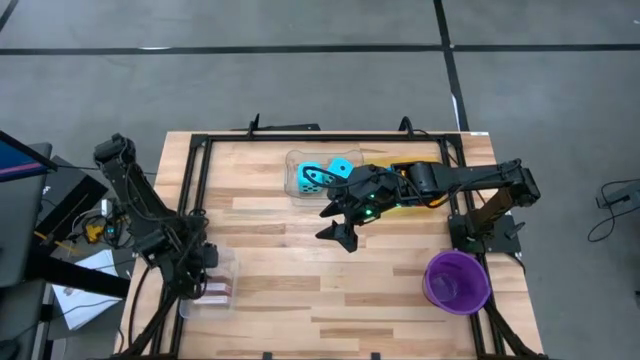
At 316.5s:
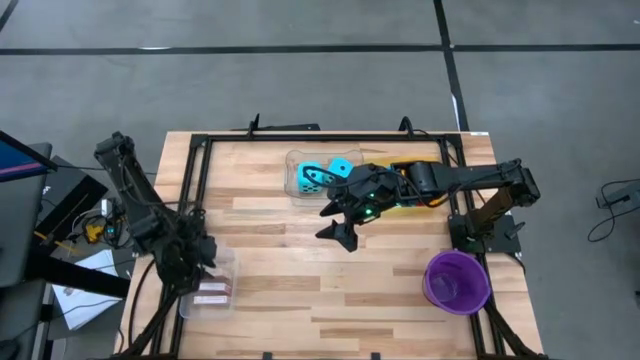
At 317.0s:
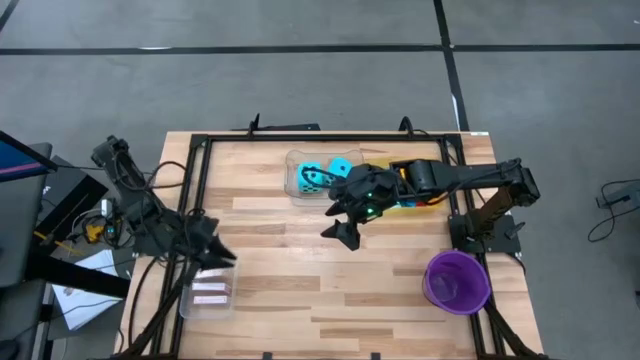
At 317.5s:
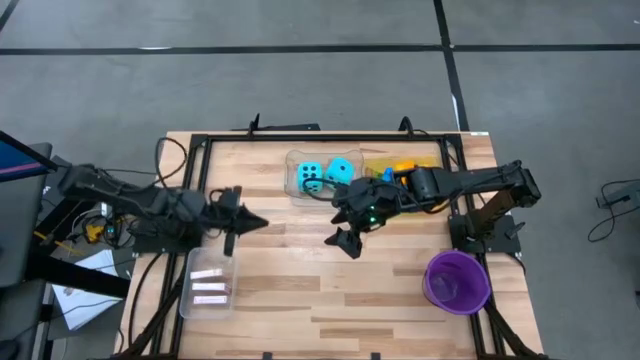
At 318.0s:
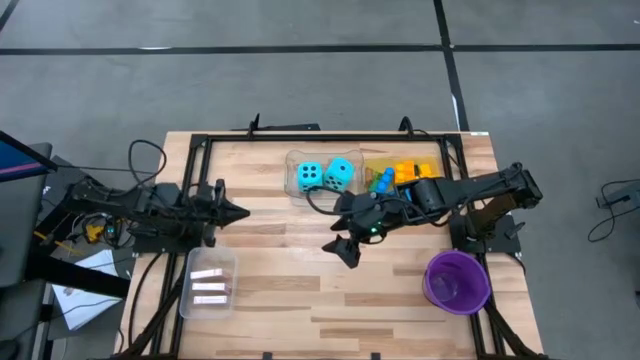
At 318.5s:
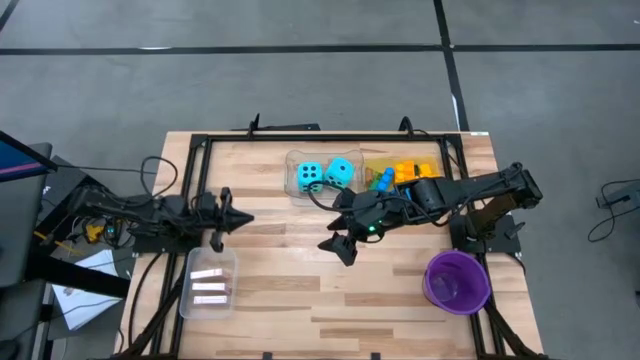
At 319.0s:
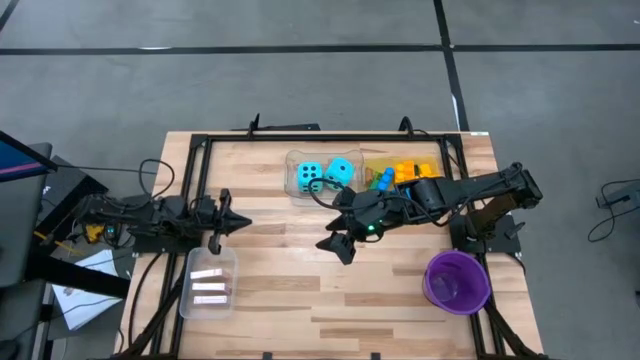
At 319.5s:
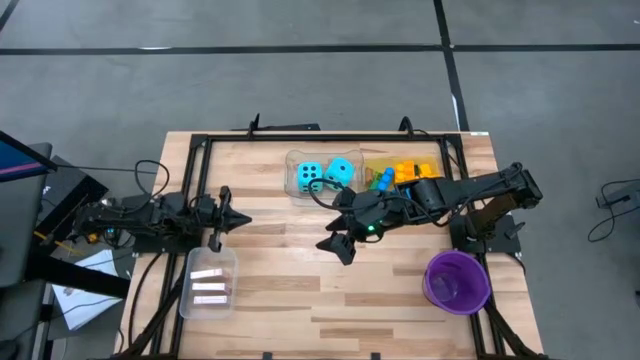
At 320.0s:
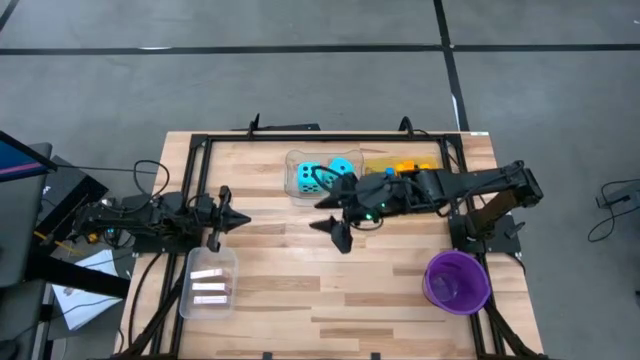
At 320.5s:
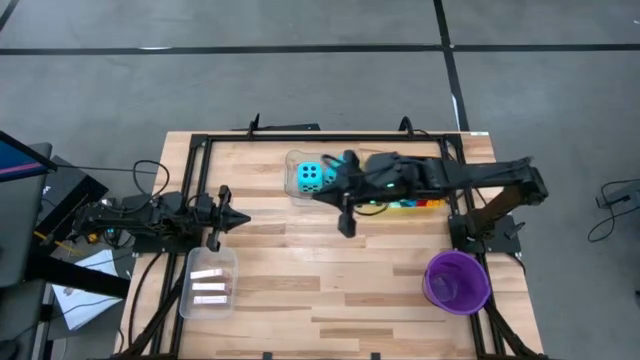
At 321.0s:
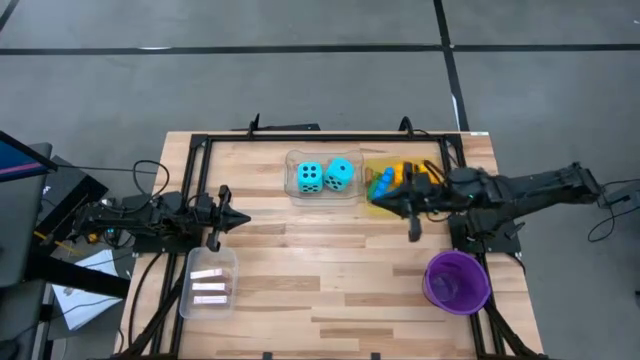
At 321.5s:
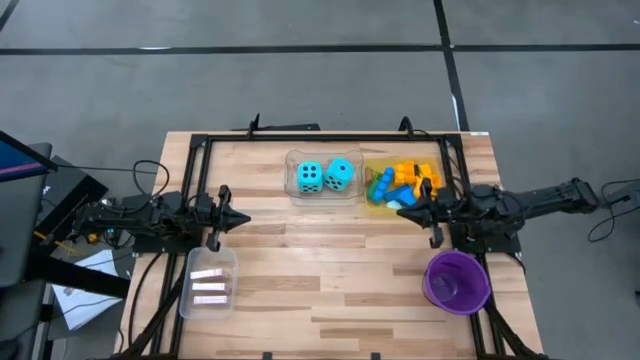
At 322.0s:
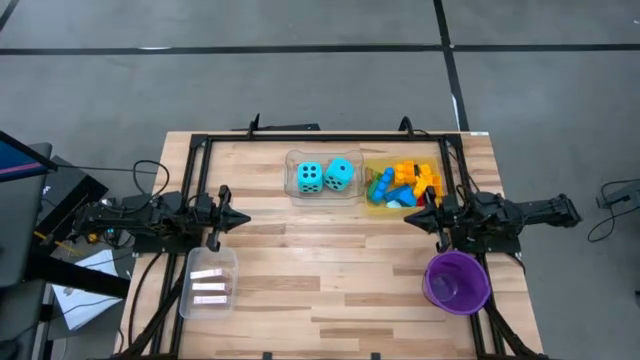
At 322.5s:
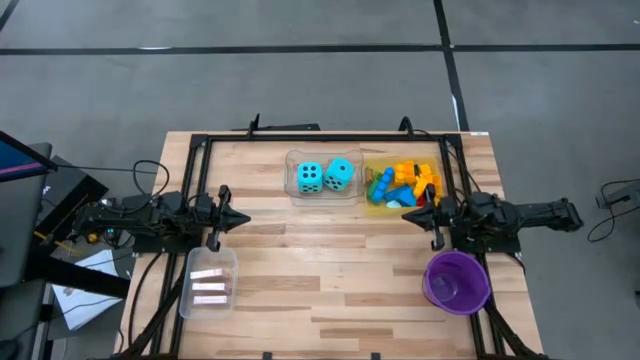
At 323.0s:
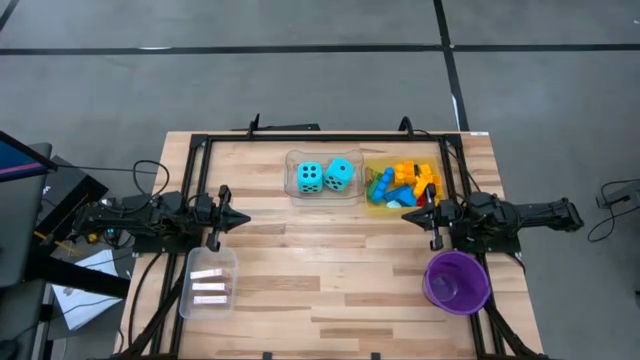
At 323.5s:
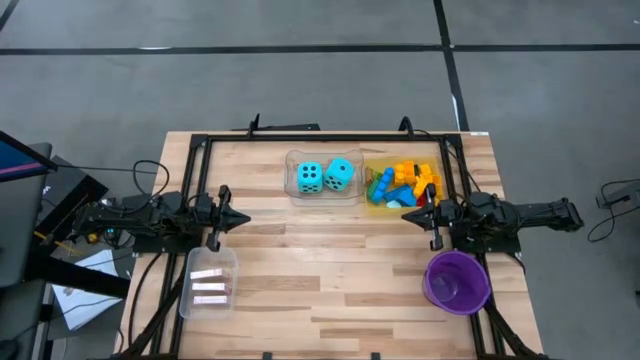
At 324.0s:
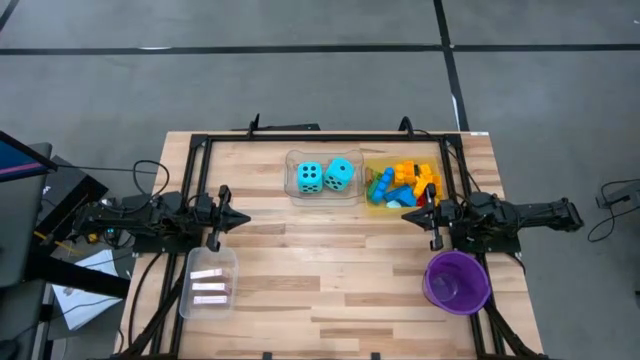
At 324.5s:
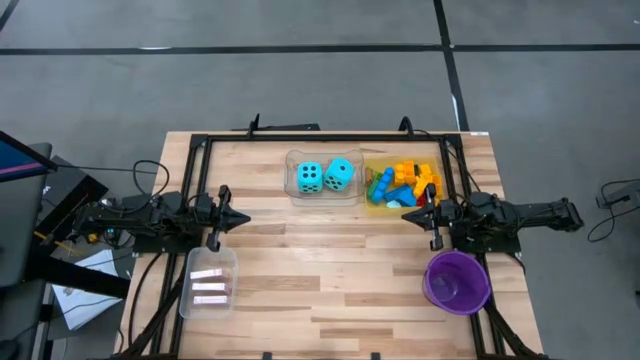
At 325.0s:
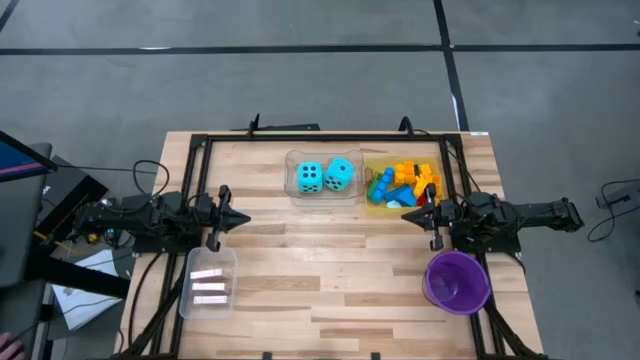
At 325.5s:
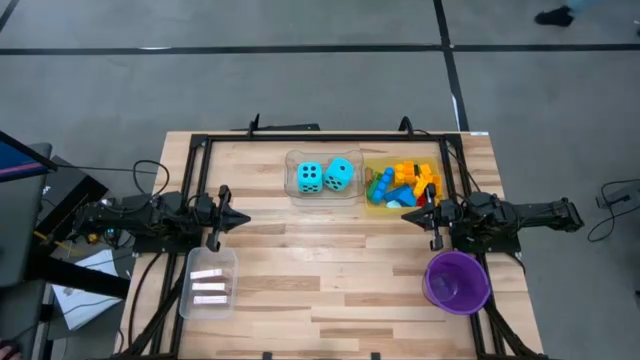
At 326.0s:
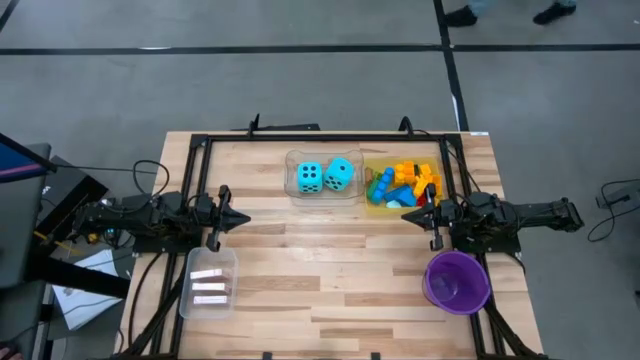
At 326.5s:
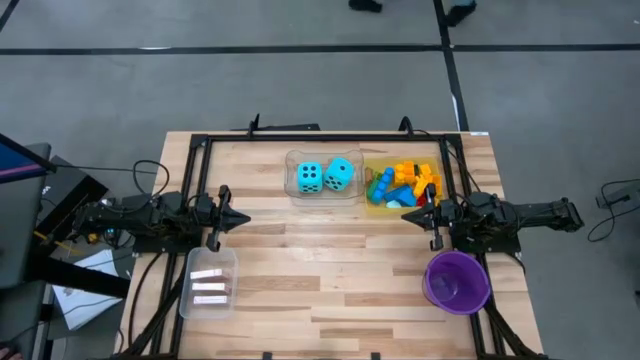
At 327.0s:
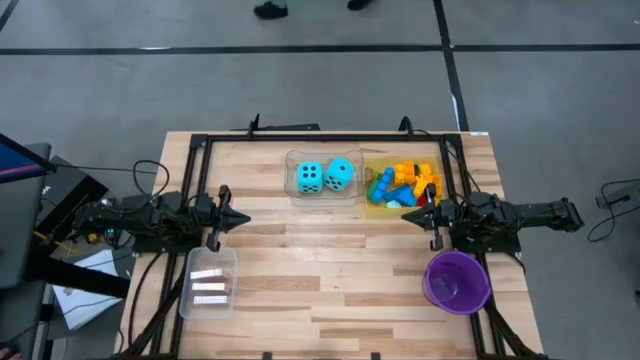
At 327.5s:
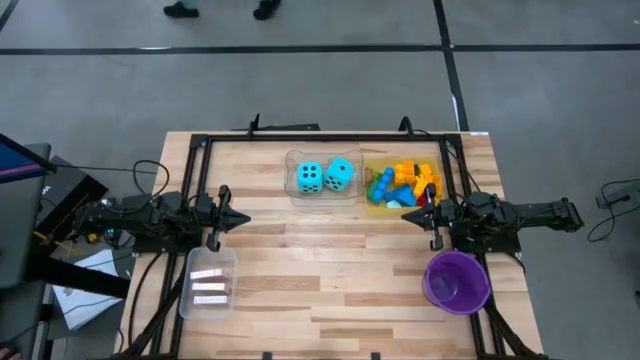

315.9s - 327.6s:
Task: Pick & Place Toys
Return to Home Position

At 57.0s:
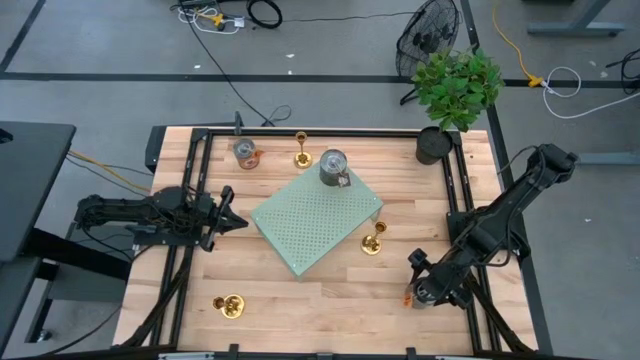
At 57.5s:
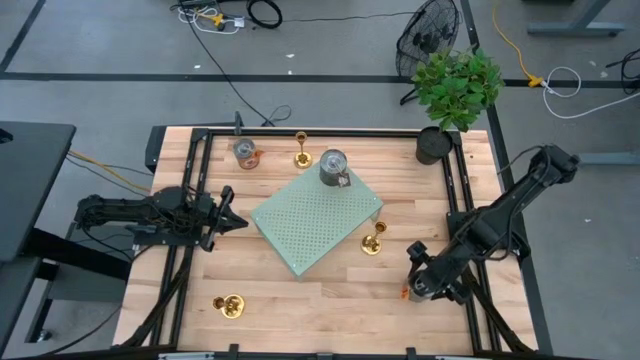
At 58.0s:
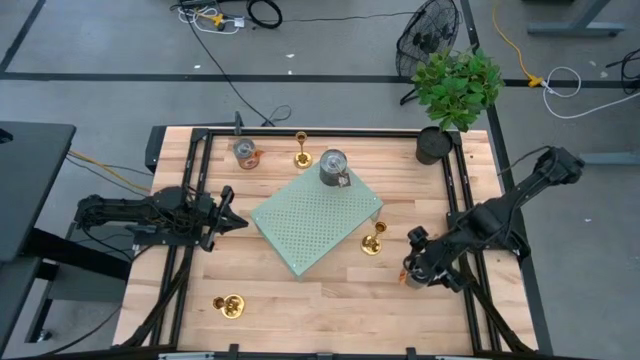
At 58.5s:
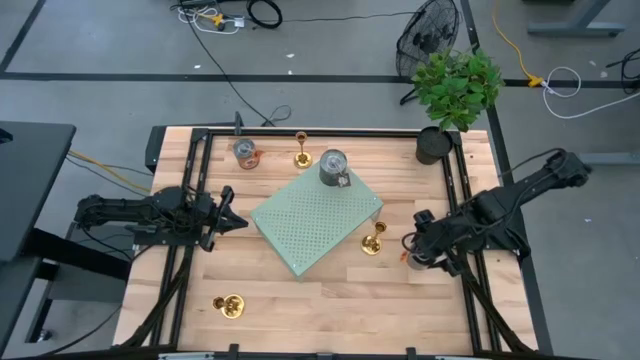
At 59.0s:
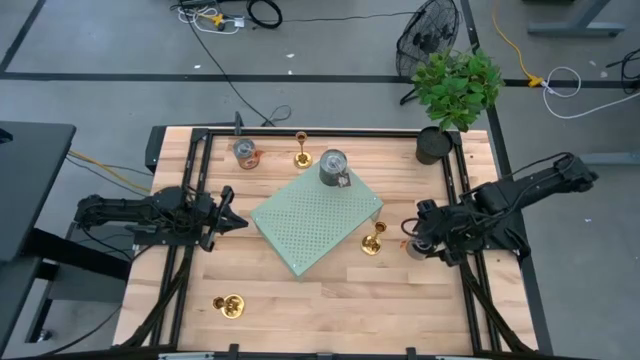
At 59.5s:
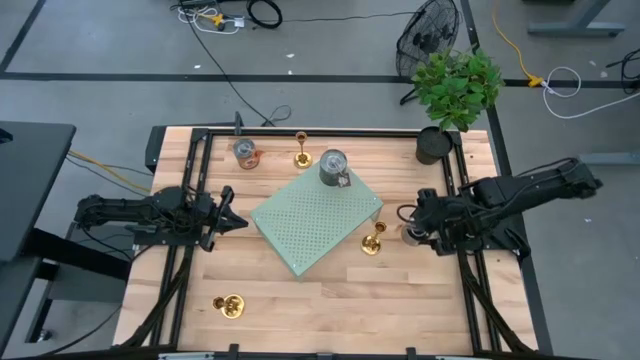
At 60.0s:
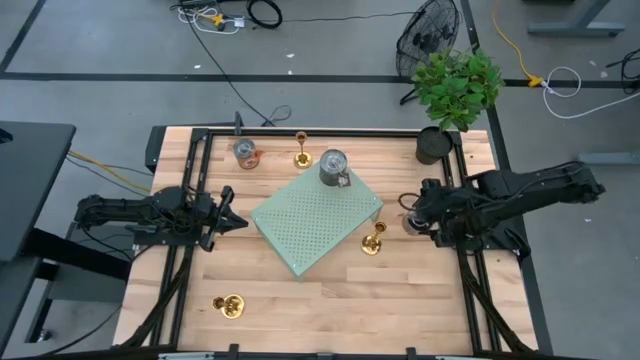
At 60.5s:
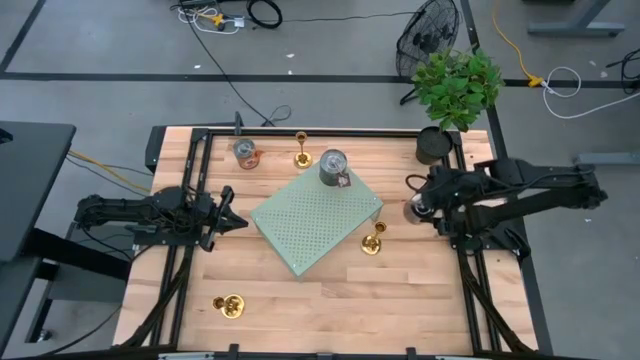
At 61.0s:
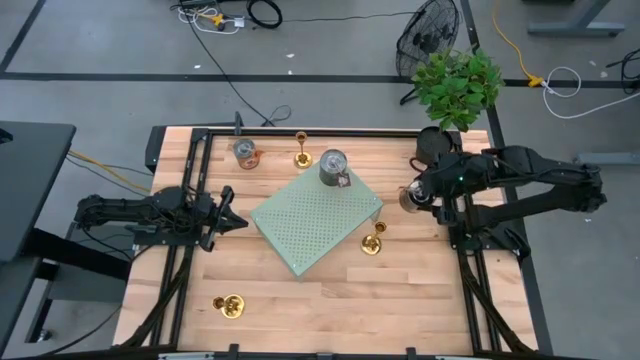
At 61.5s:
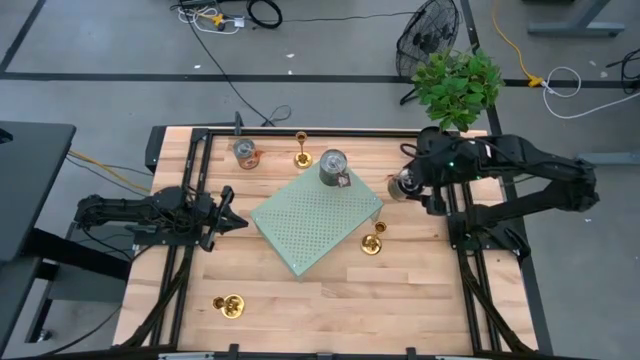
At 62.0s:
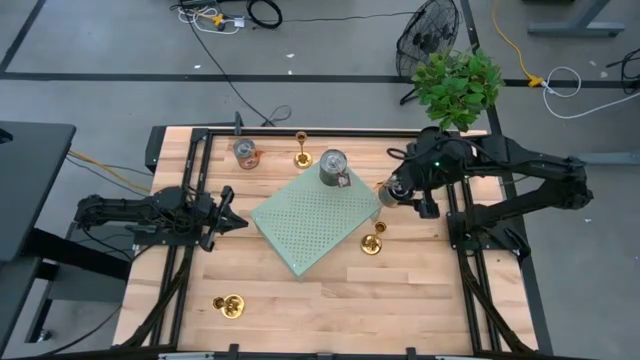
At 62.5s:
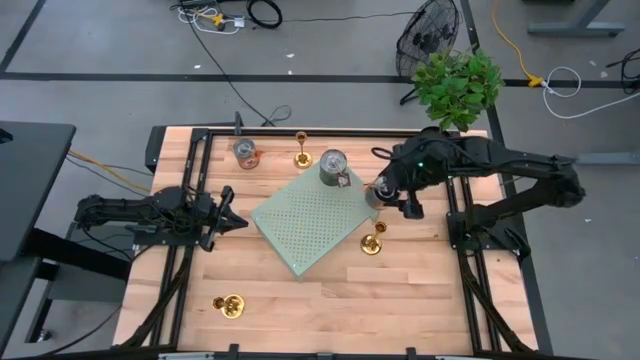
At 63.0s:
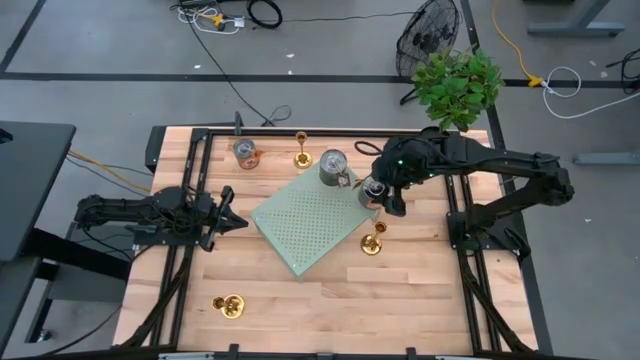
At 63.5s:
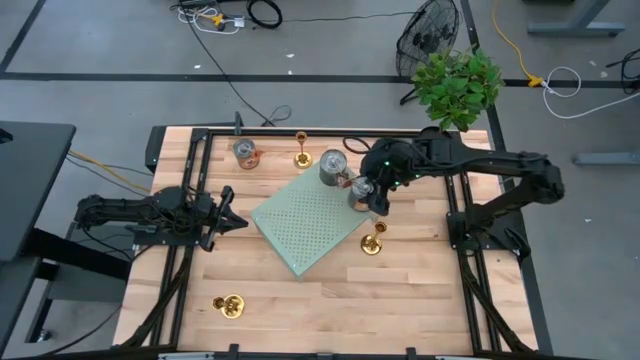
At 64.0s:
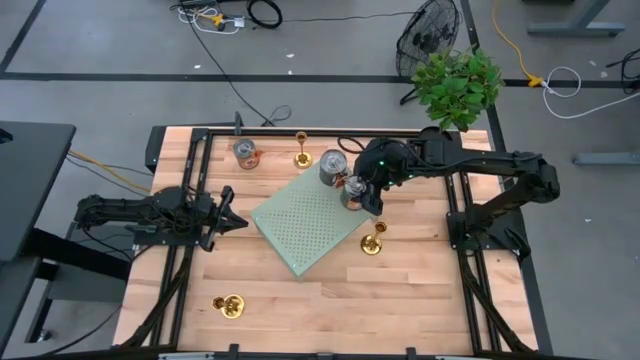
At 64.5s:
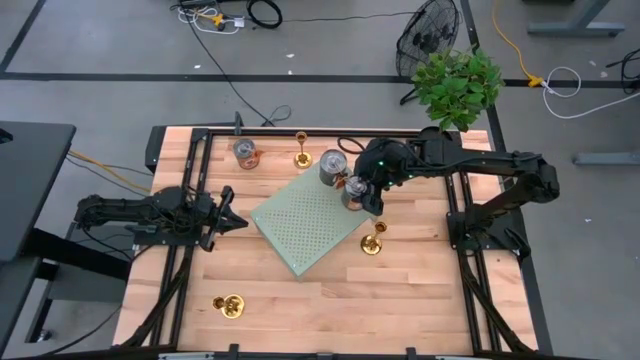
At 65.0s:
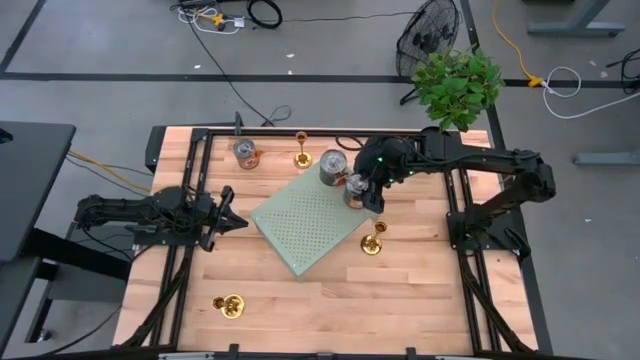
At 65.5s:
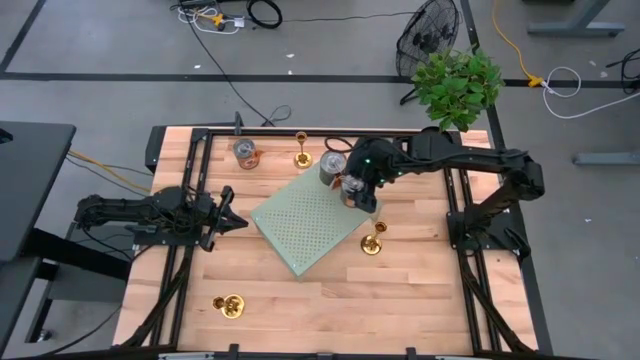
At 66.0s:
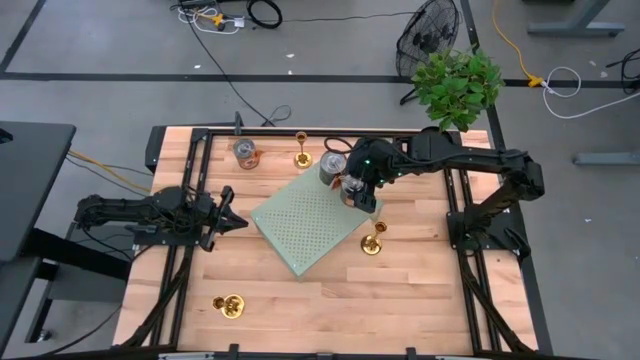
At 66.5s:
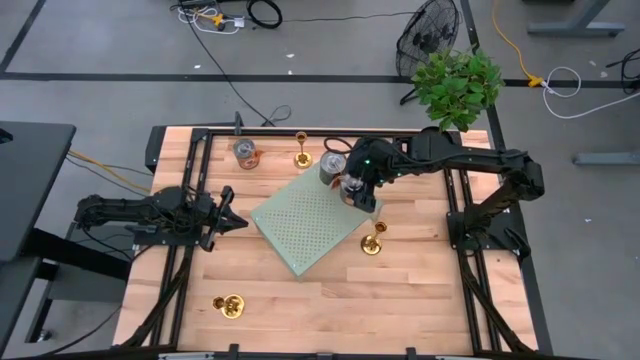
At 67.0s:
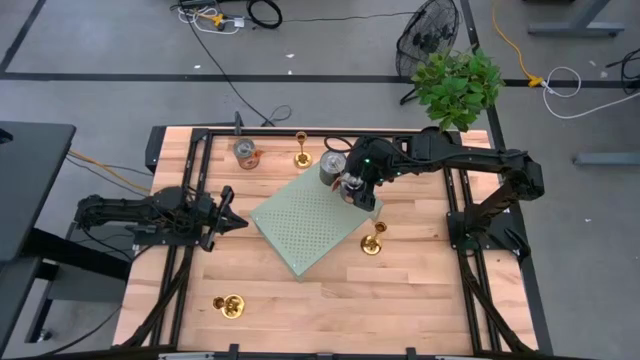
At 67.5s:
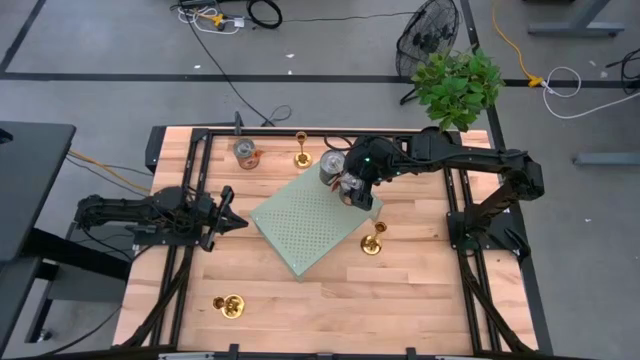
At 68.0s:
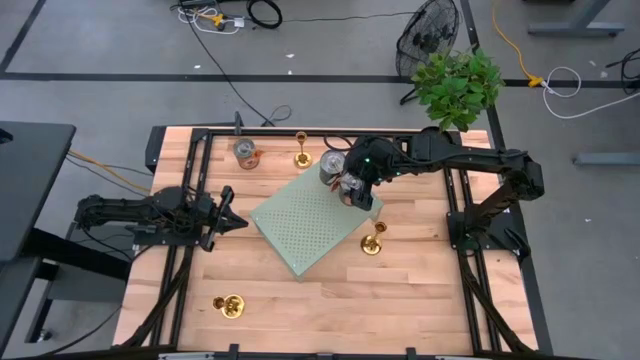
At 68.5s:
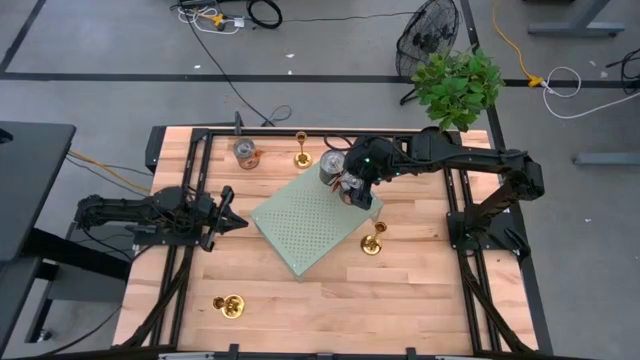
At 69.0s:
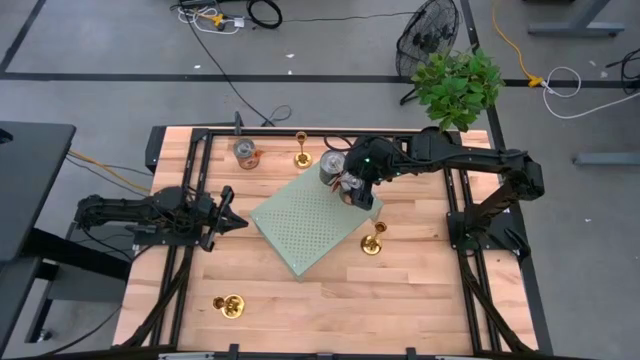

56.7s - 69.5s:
Task: Pick & Place candle stick holders
Put the bottom silver scented candle on the shelf
